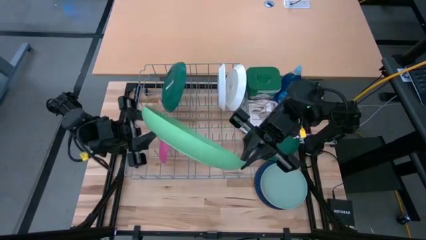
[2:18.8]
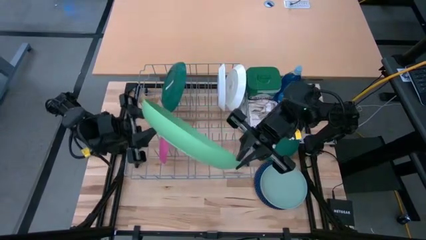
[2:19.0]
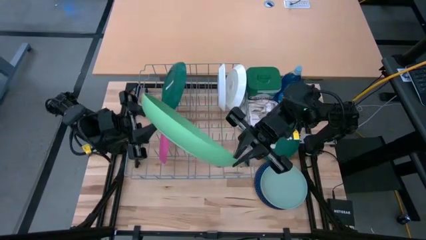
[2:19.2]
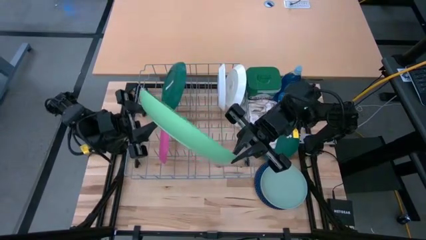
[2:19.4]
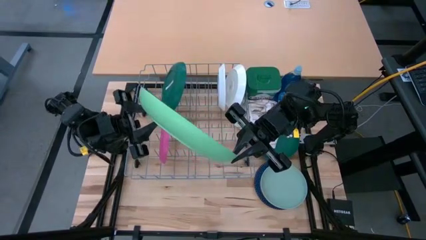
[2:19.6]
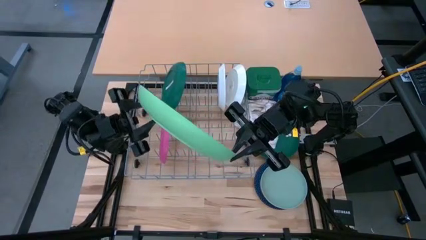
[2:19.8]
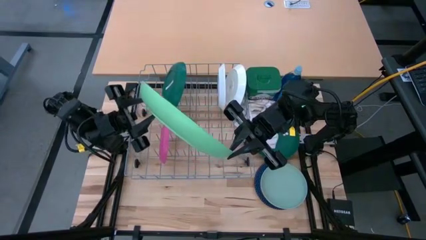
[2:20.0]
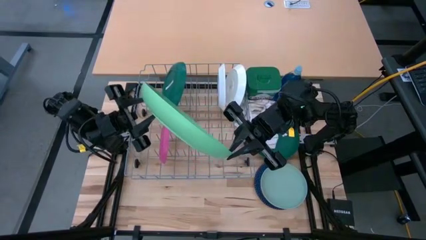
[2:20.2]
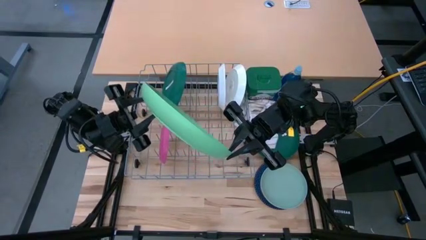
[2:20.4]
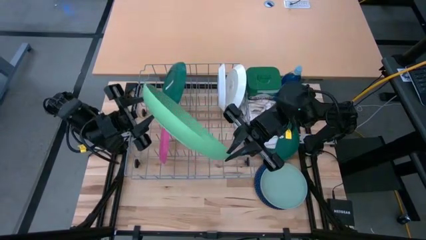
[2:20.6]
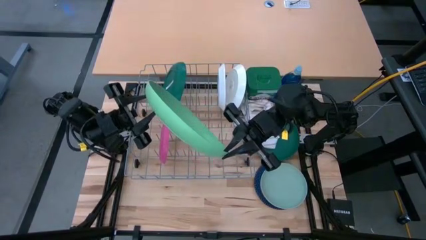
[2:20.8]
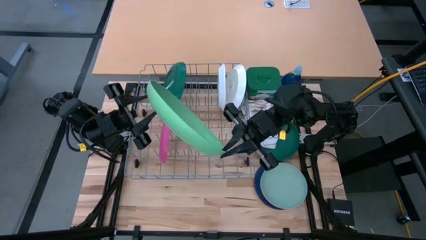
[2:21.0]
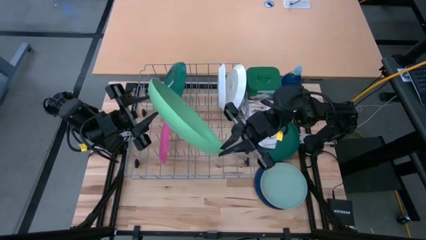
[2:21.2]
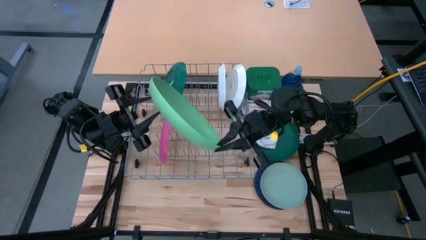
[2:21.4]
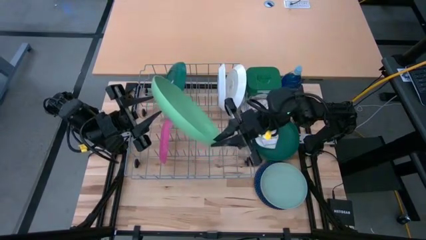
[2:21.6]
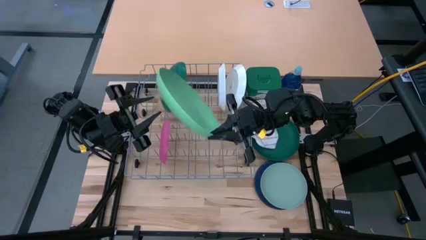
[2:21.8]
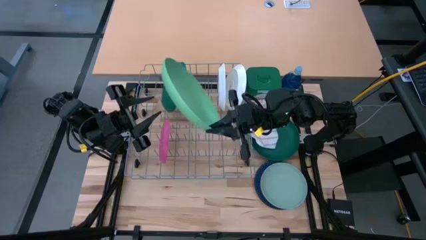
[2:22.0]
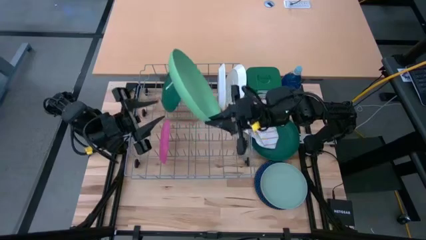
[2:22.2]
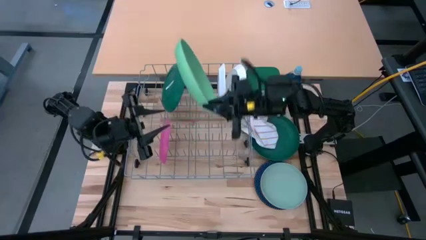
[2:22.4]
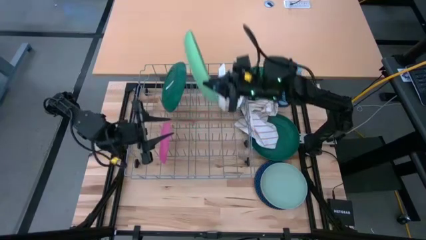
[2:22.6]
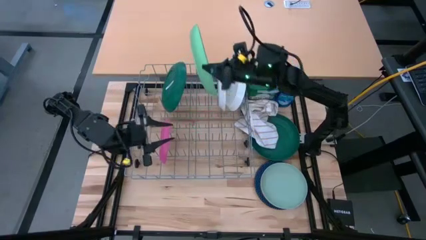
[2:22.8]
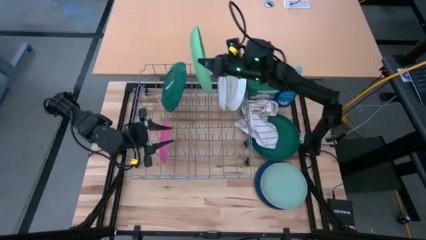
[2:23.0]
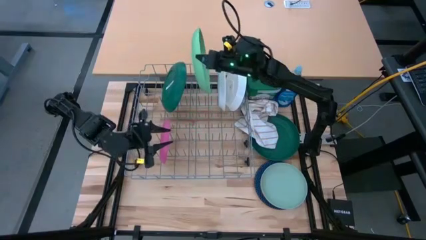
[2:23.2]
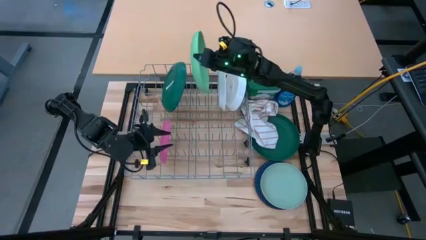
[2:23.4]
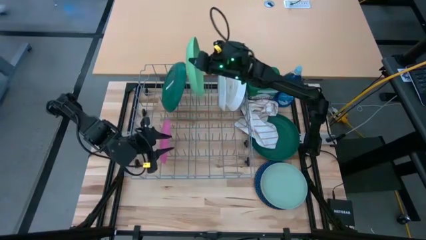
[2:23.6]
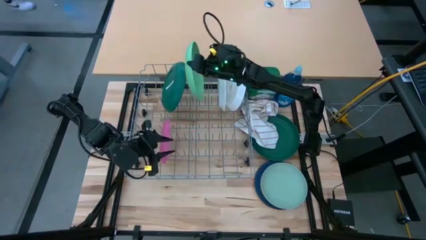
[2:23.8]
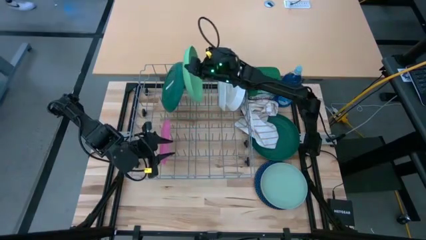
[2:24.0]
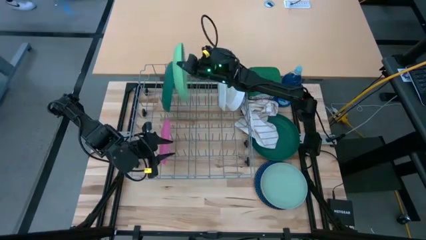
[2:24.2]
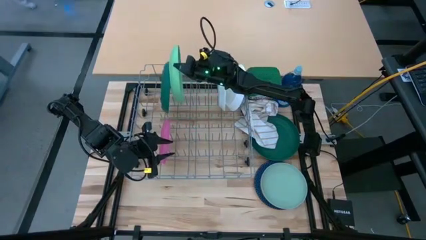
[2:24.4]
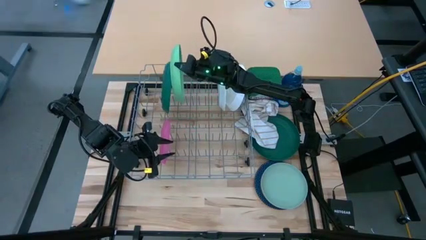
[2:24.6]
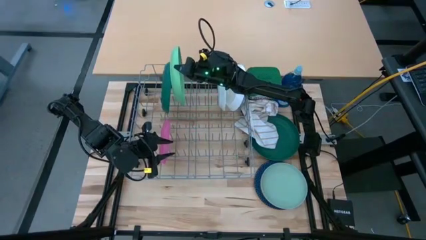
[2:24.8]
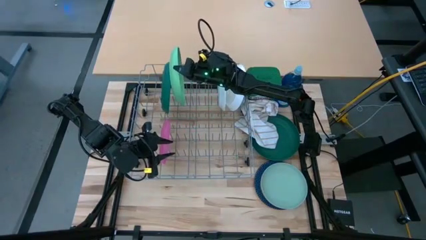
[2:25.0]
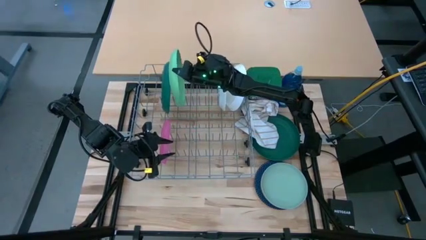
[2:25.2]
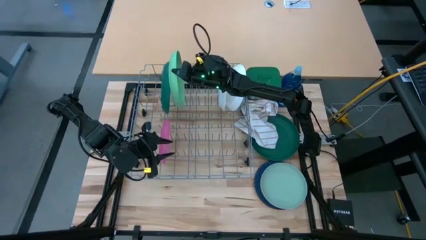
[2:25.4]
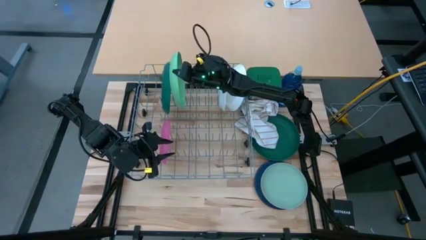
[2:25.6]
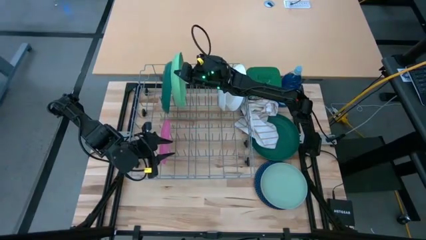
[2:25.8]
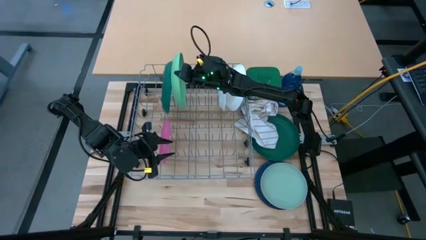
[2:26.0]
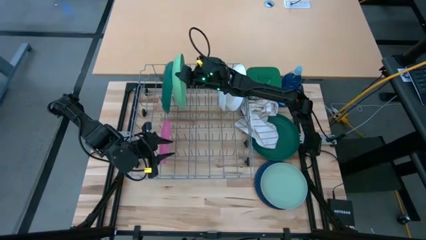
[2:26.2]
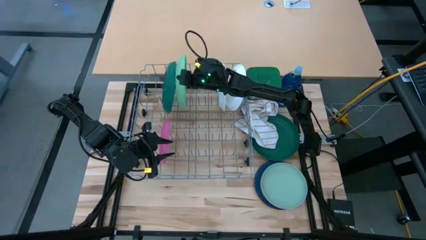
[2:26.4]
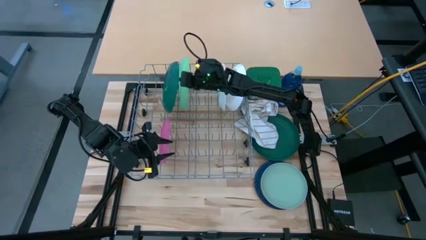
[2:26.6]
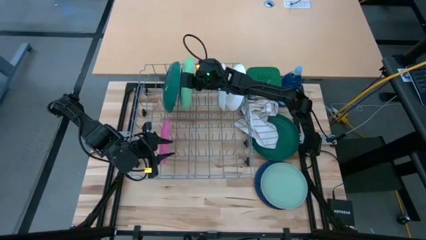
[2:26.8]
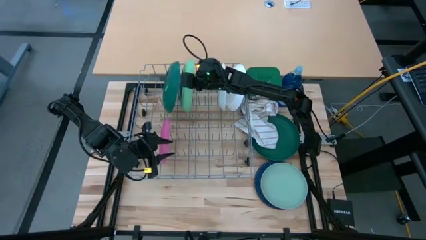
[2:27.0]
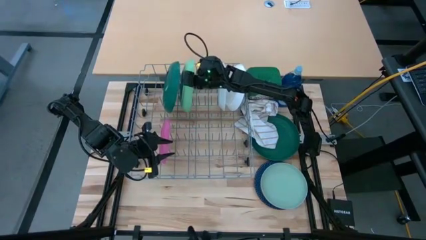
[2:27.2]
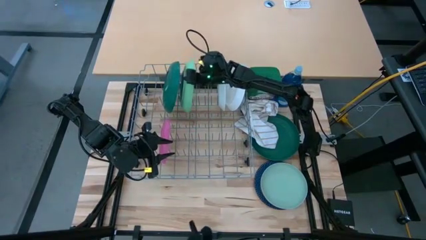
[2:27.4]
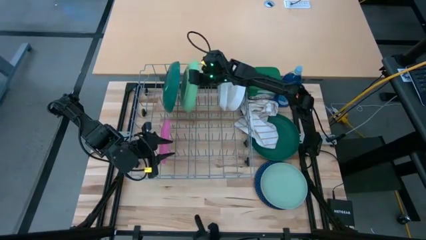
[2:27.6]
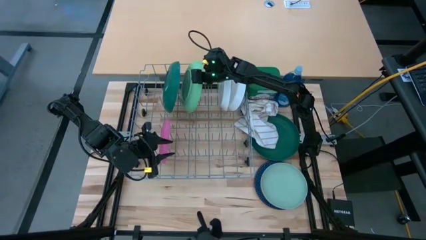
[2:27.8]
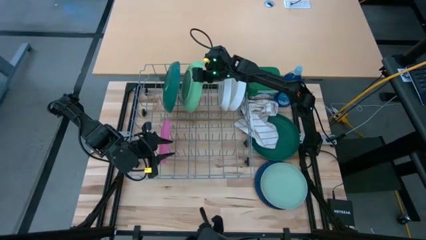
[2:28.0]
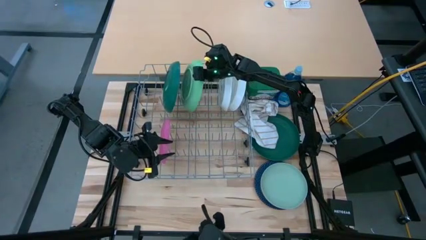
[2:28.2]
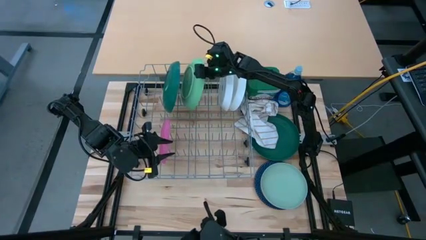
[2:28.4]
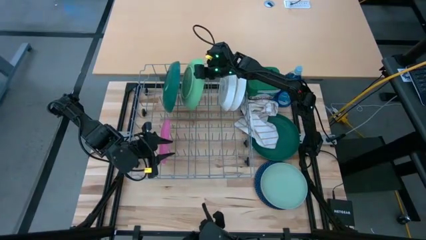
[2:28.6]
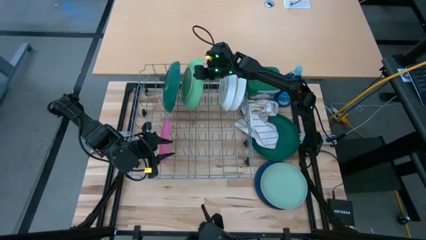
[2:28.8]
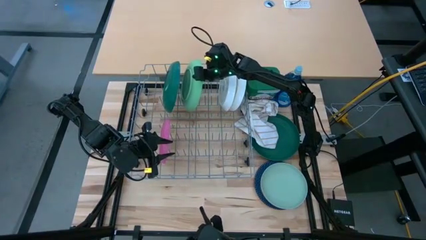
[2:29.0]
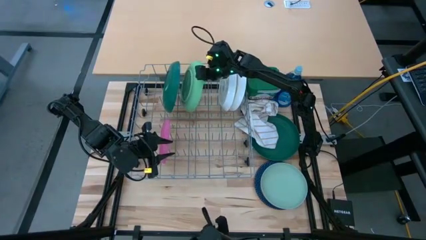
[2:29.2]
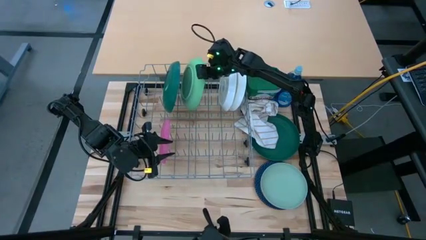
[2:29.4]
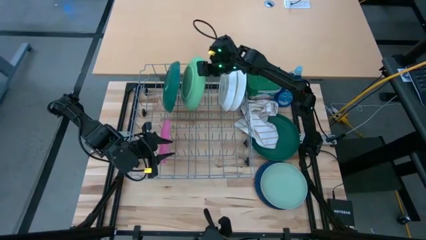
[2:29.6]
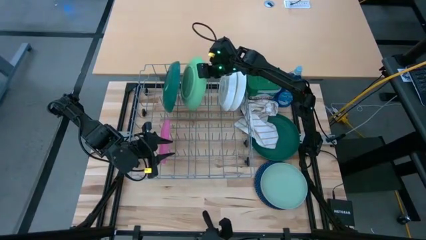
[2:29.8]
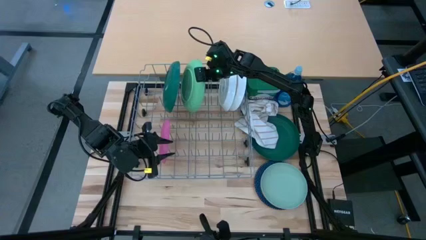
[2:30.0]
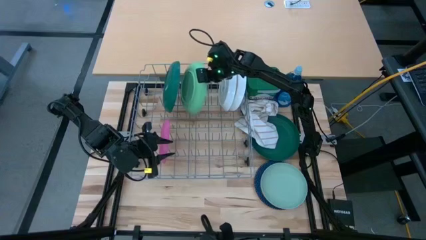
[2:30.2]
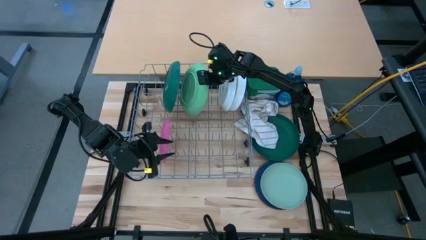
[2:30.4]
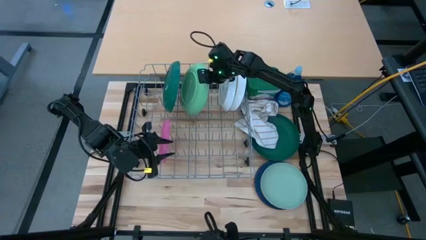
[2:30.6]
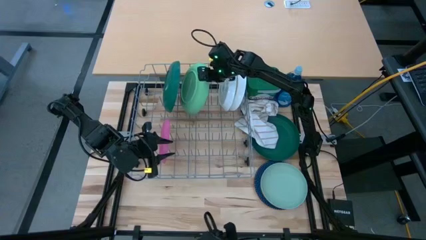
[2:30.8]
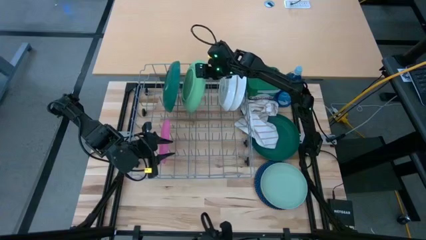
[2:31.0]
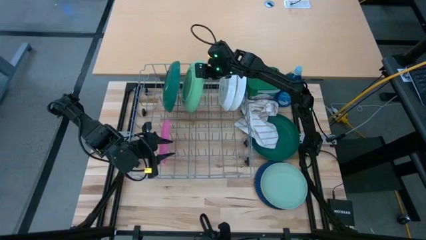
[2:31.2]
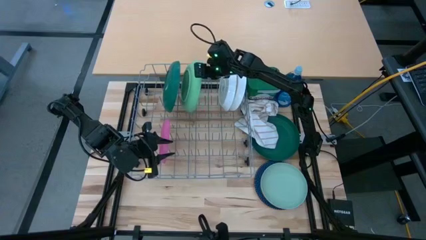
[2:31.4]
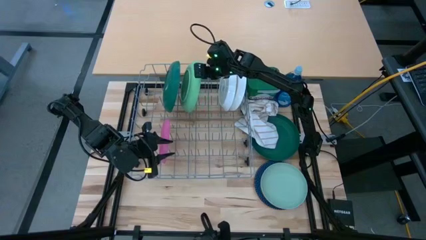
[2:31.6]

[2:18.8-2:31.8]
Task: Sort dishes
Put the light green plate in the dish rack
